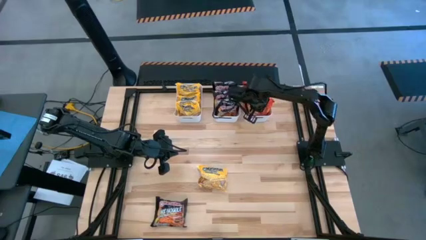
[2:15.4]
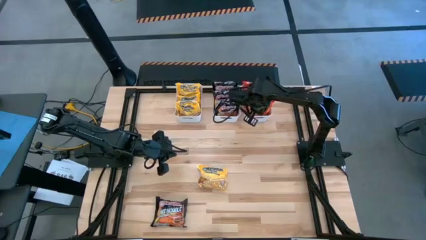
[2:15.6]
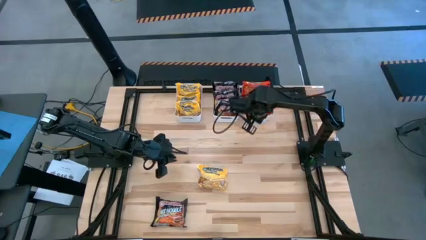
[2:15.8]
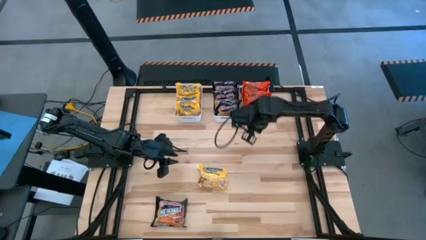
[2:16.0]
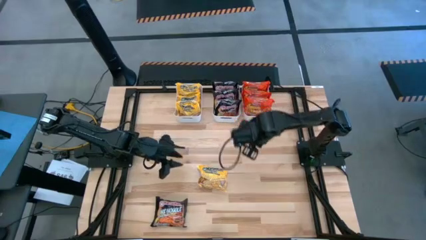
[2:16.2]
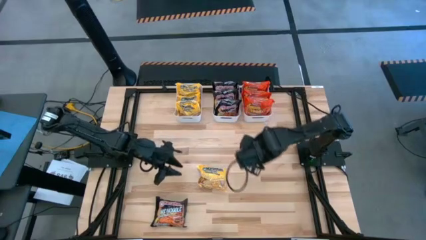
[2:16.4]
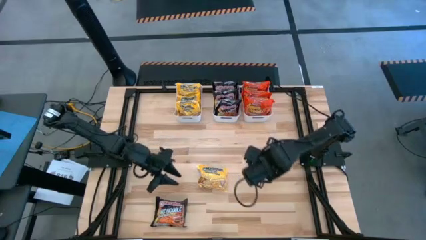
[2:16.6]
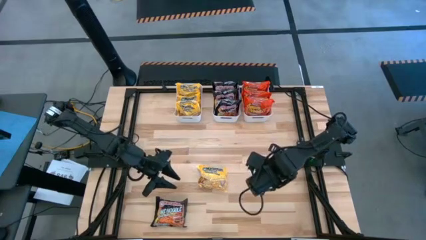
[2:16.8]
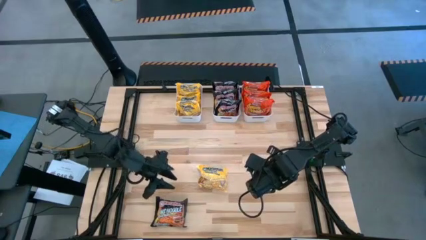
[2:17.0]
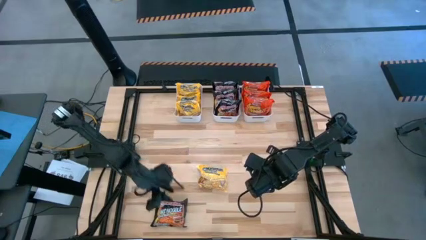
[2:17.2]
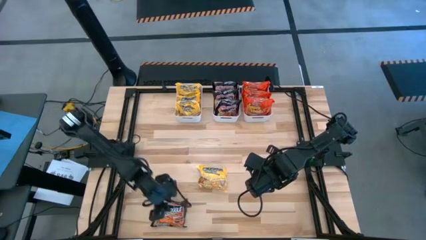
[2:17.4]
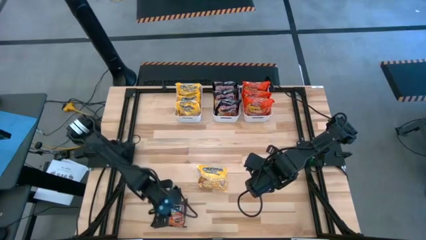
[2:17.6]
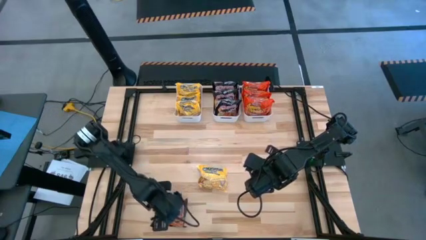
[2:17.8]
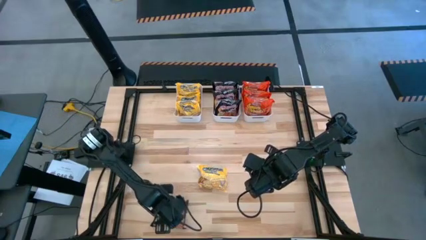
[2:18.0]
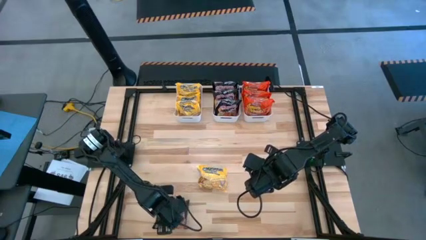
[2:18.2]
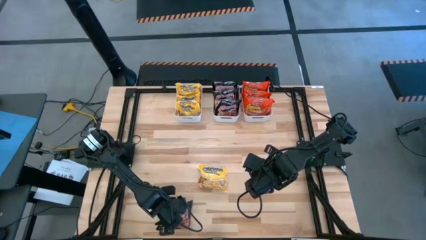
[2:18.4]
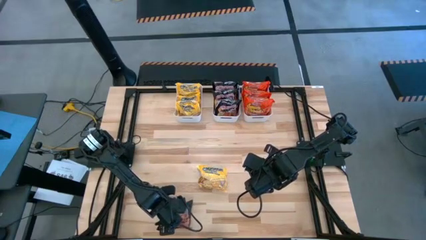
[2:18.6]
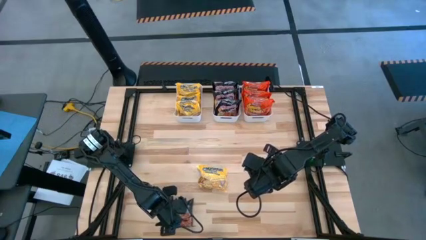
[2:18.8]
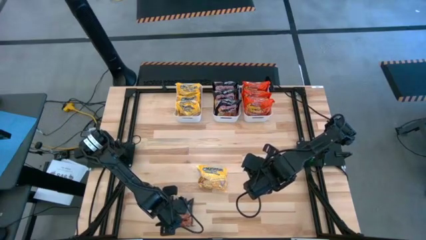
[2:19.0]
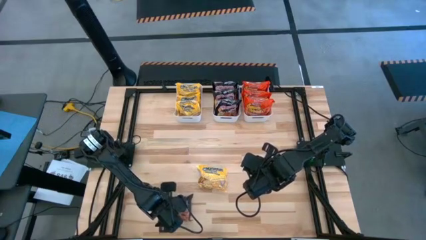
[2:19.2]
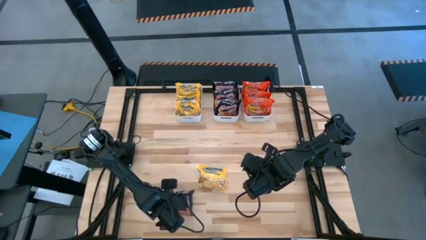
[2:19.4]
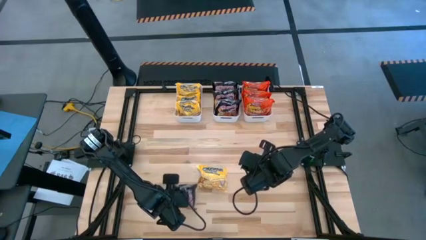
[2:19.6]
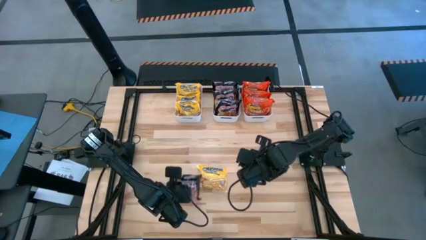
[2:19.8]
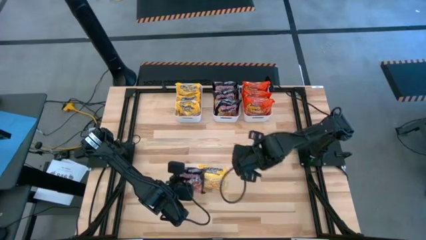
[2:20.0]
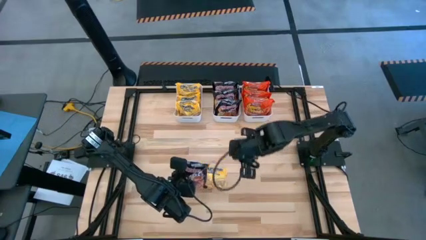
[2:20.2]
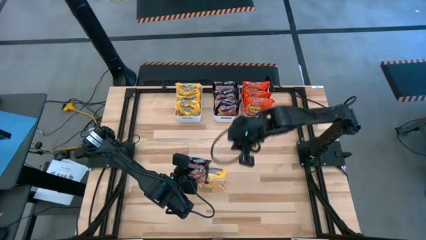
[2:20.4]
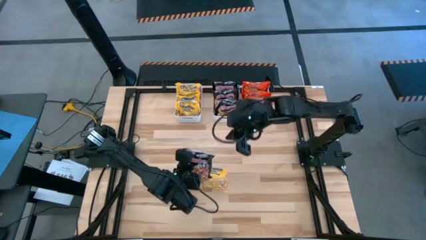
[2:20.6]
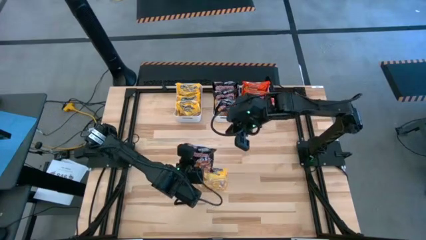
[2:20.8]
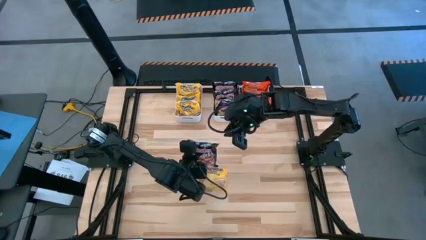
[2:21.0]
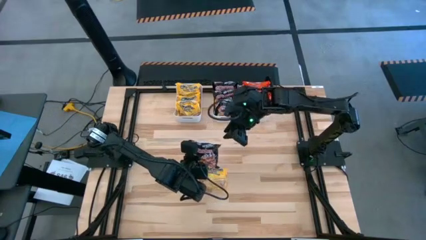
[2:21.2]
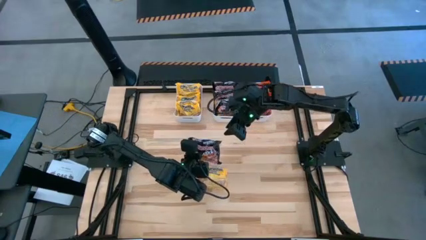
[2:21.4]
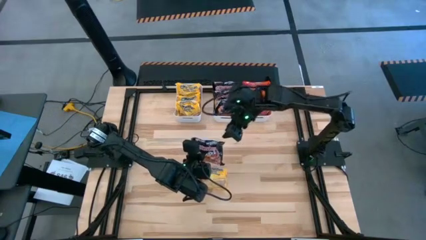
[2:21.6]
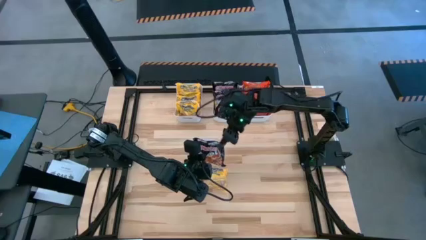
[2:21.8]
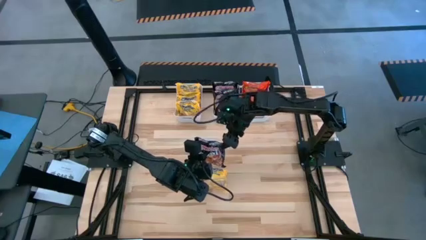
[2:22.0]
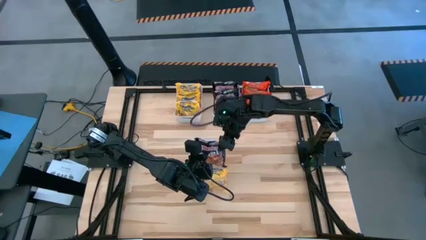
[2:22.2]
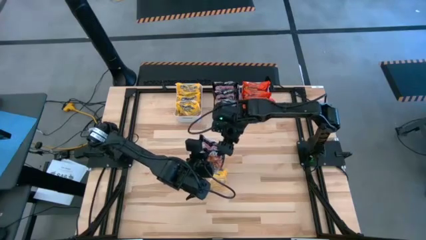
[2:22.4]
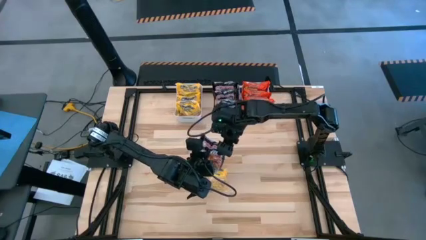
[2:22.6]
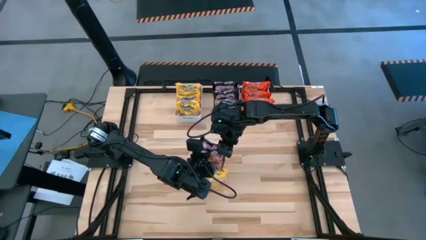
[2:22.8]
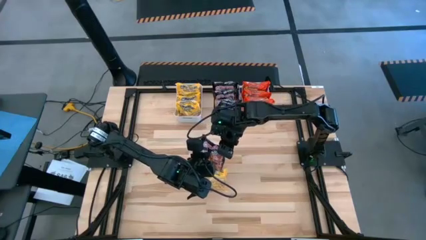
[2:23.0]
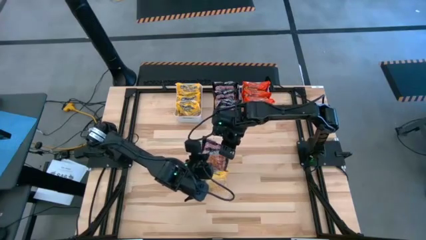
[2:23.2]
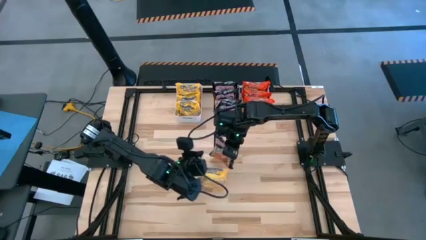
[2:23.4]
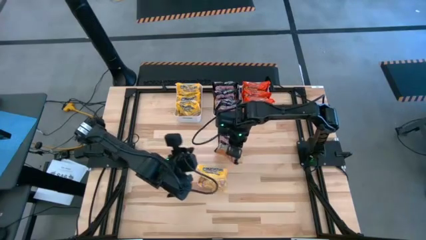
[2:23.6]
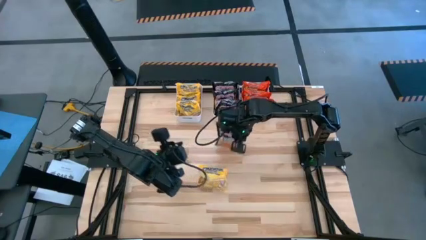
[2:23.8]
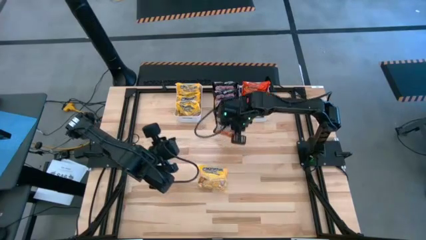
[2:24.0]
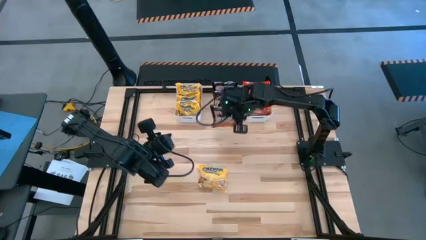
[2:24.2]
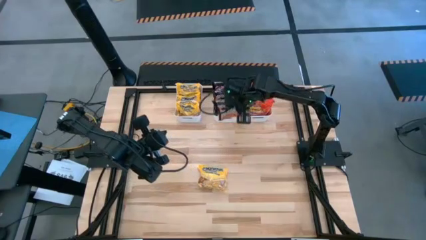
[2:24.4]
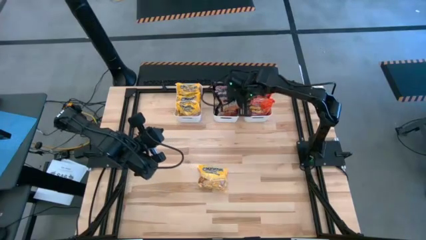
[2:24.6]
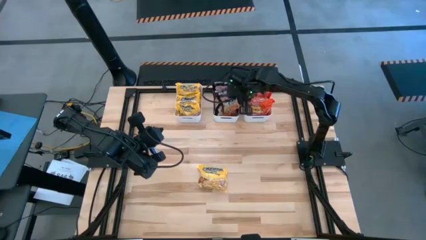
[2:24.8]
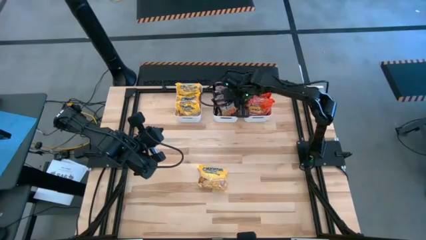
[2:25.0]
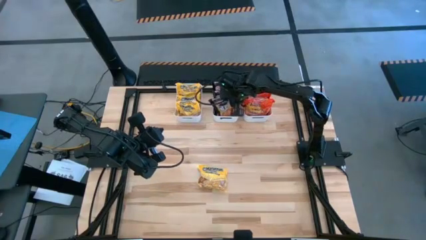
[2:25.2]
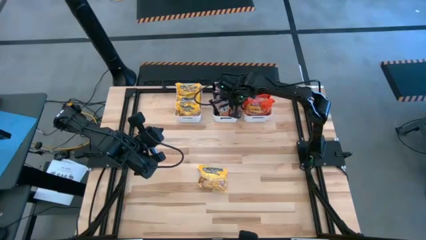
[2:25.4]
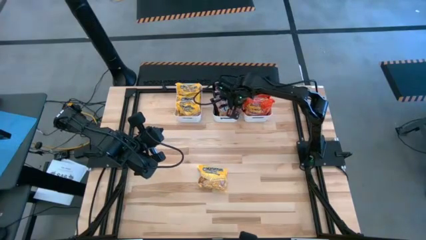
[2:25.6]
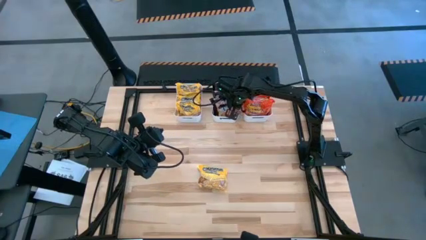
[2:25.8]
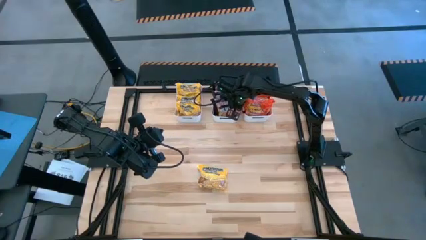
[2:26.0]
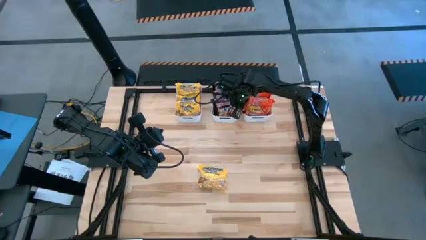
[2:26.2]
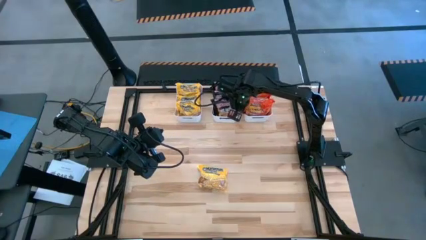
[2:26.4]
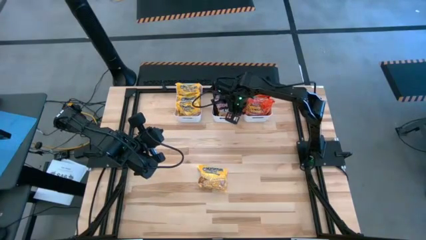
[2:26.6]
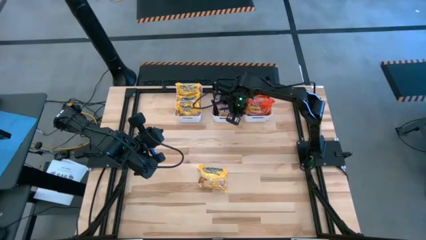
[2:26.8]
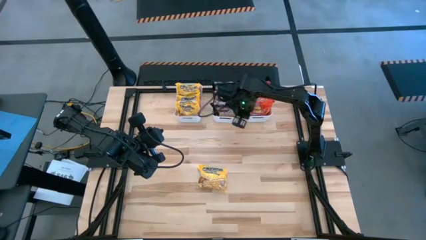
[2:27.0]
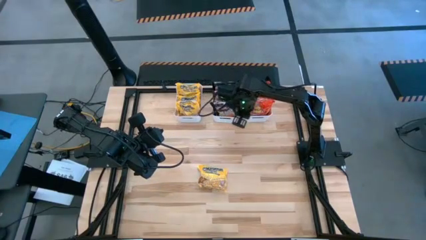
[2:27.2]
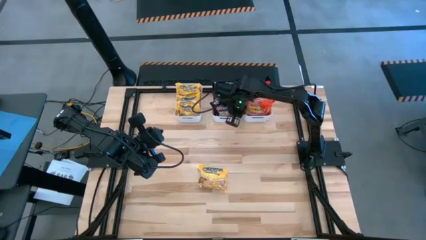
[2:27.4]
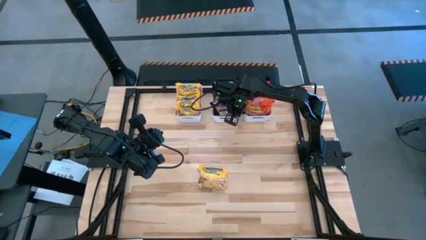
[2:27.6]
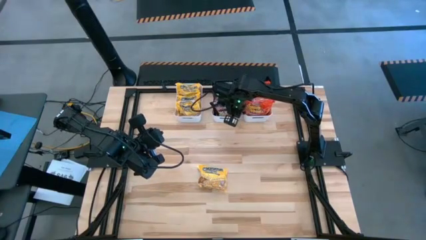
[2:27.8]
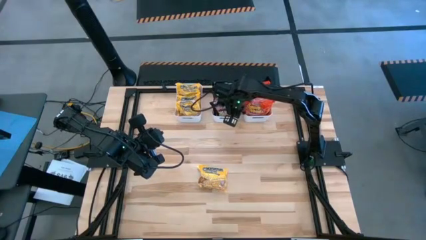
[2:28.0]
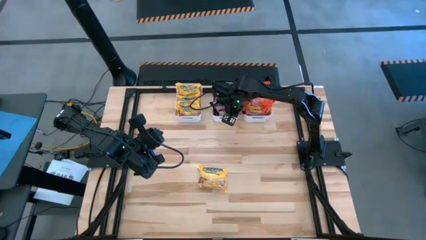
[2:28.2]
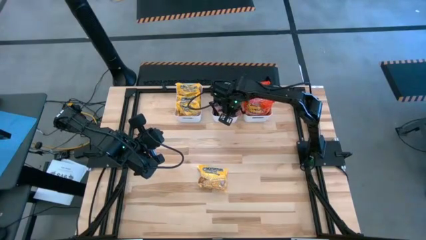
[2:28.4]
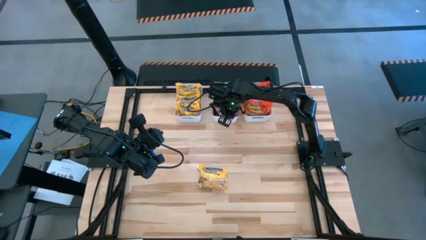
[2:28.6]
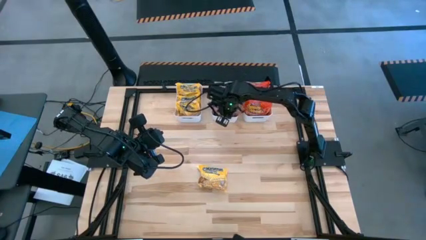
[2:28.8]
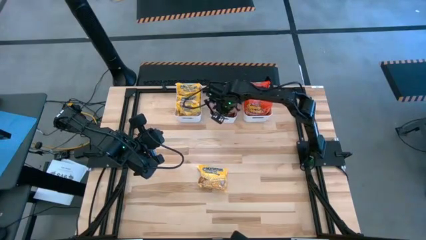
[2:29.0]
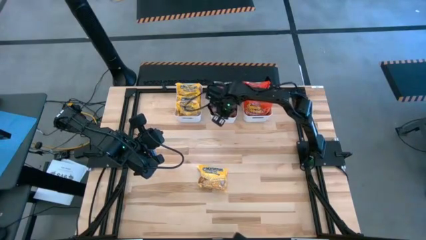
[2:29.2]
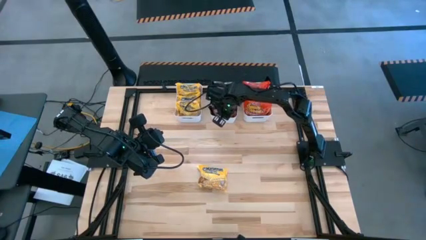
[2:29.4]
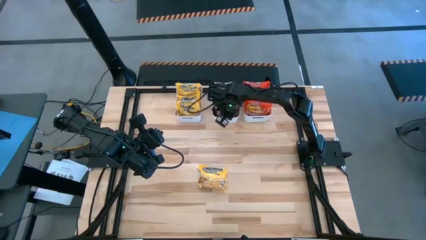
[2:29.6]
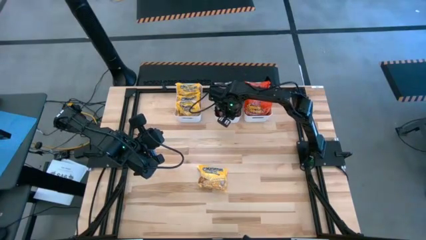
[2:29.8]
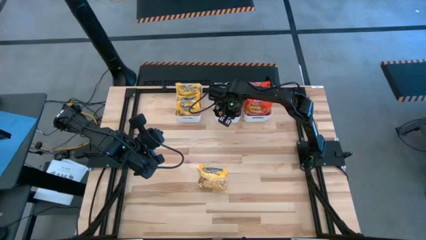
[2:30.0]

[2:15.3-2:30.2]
Task: Sort Maruchan noodles
Put the black noodle pack into the middle white bin

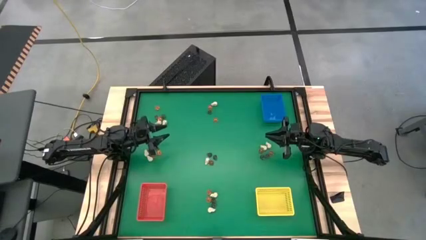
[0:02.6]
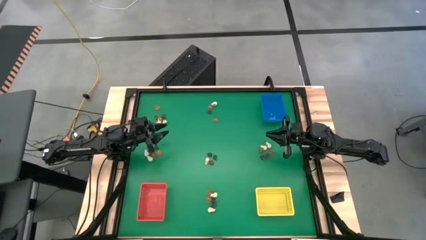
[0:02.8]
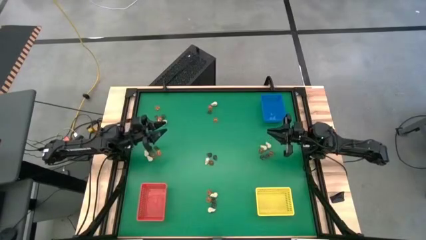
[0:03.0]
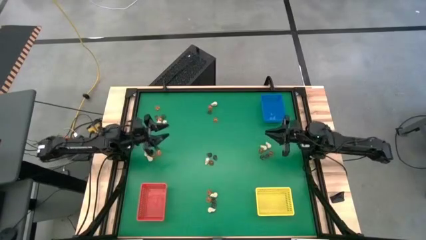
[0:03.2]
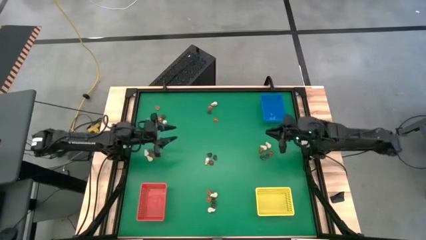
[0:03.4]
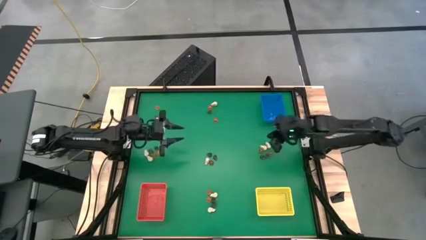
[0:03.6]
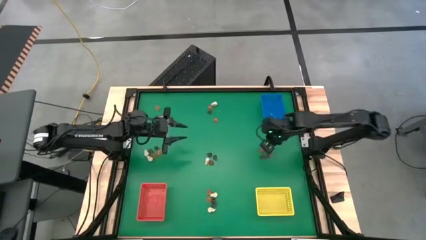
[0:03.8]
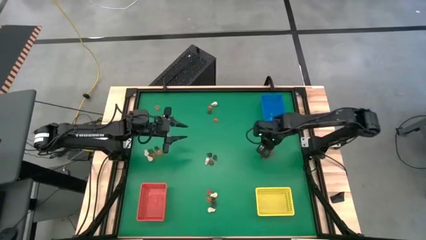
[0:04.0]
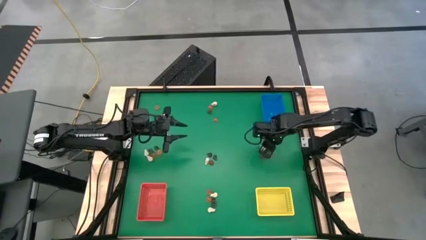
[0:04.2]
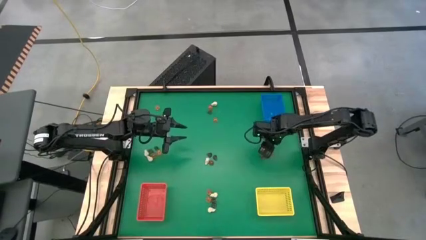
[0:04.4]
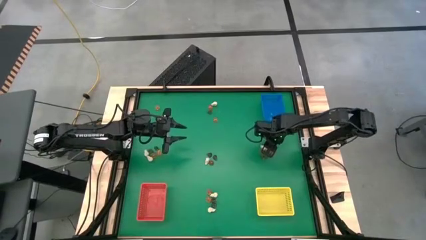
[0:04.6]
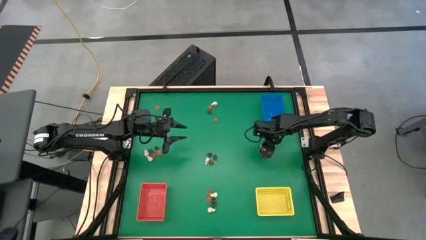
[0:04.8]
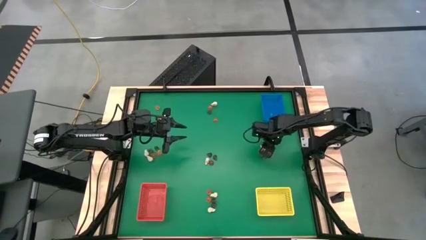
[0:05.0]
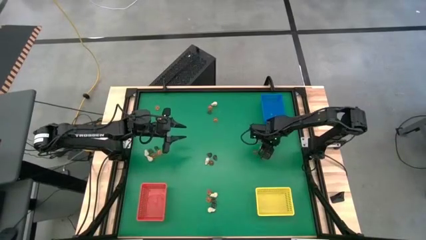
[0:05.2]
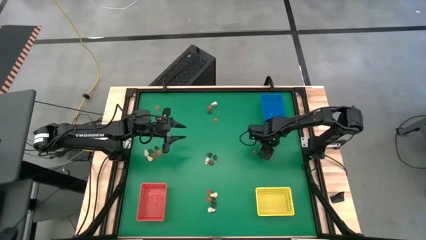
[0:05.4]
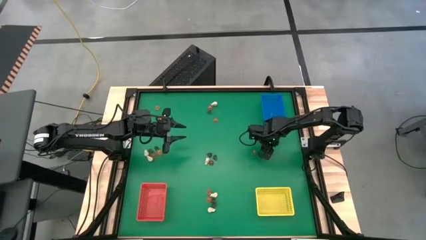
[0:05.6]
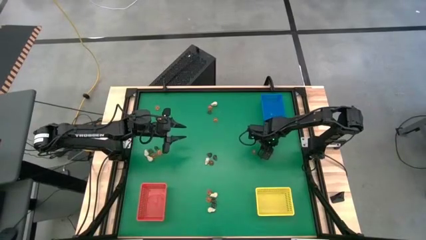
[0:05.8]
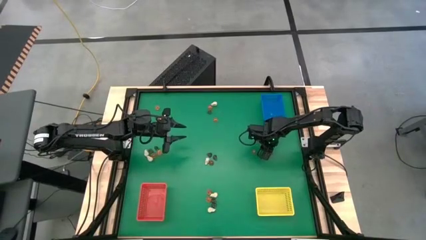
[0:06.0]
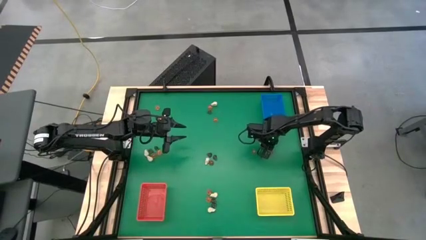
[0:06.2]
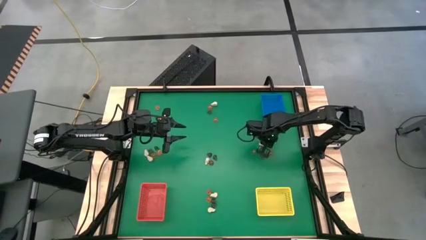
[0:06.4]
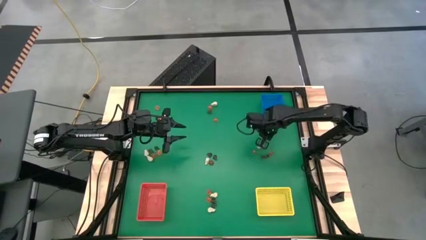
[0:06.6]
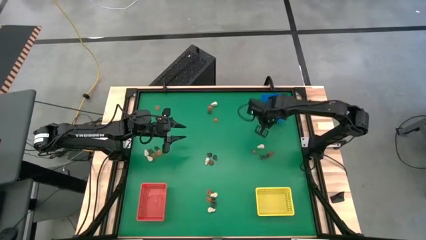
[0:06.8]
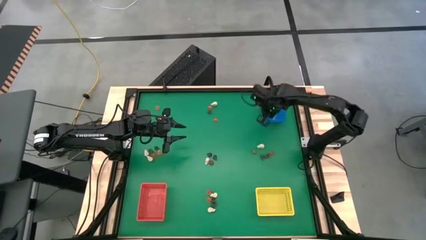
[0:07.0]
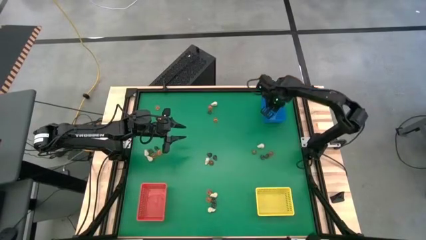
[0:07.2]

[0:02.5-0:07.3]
Task: Sort Halloween decoration
Put the white skull toy into the blue bin
